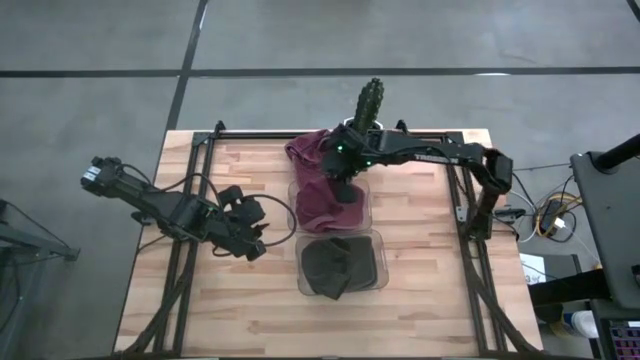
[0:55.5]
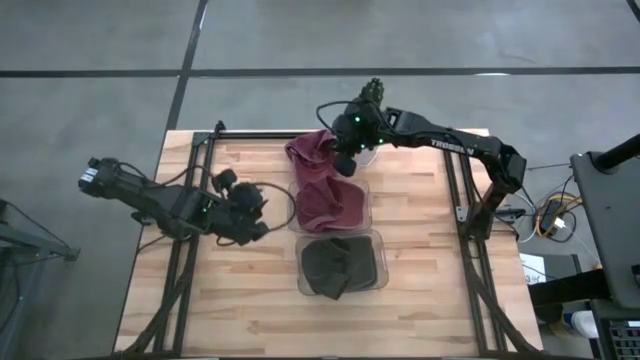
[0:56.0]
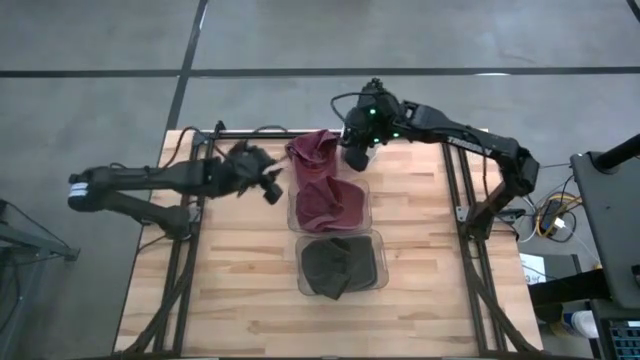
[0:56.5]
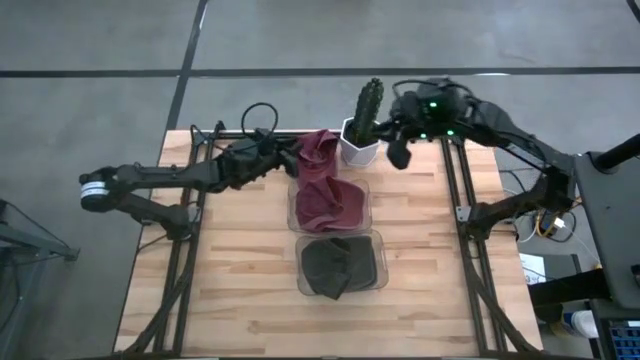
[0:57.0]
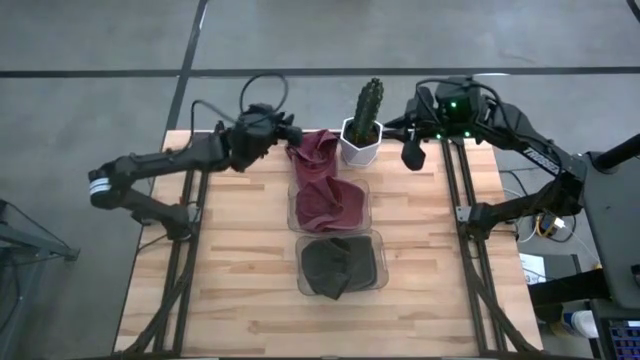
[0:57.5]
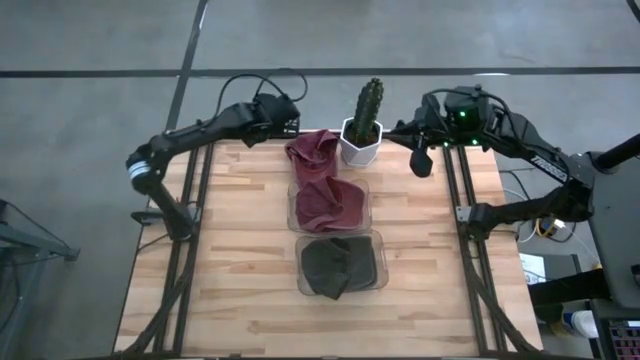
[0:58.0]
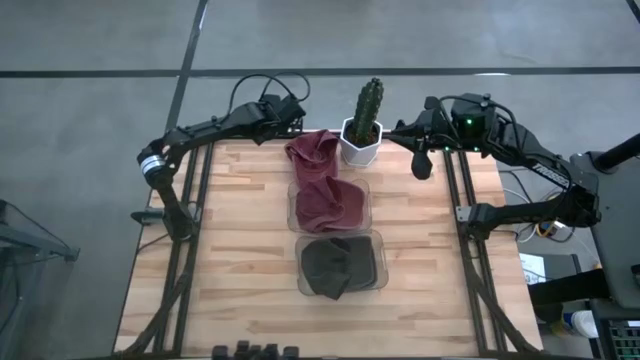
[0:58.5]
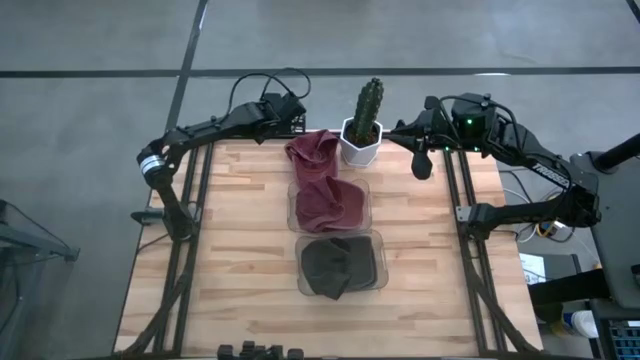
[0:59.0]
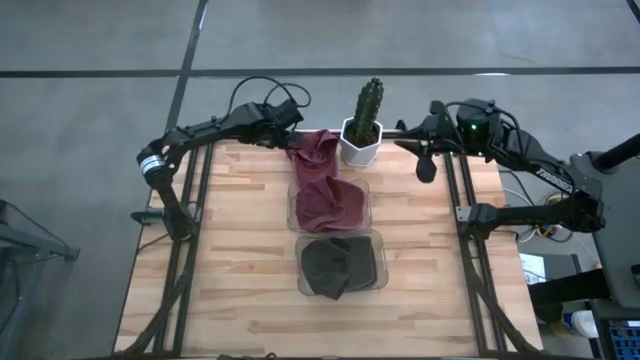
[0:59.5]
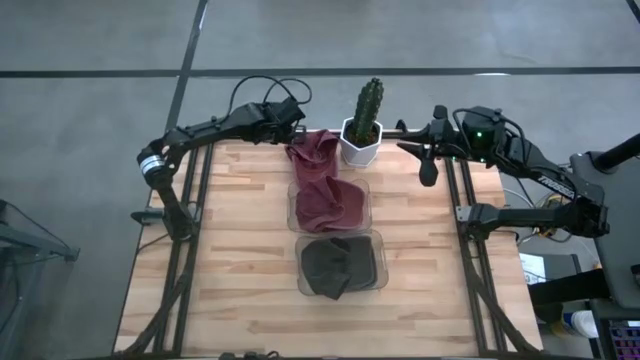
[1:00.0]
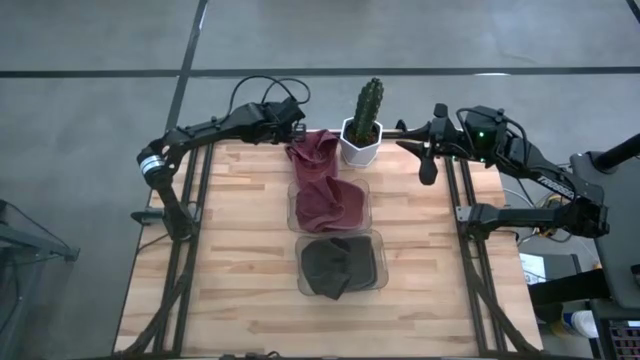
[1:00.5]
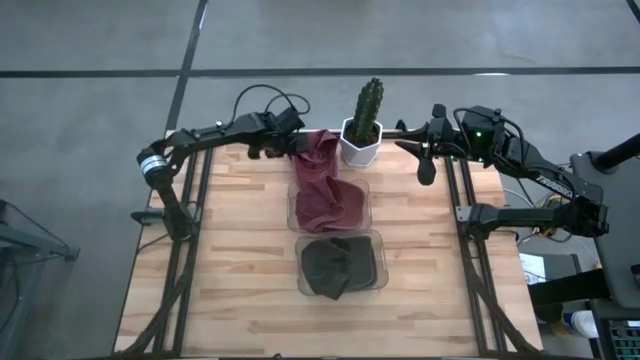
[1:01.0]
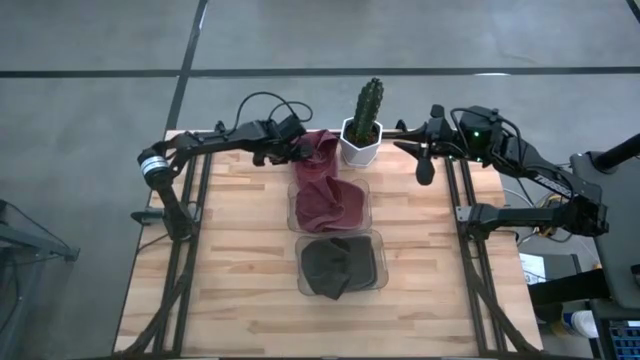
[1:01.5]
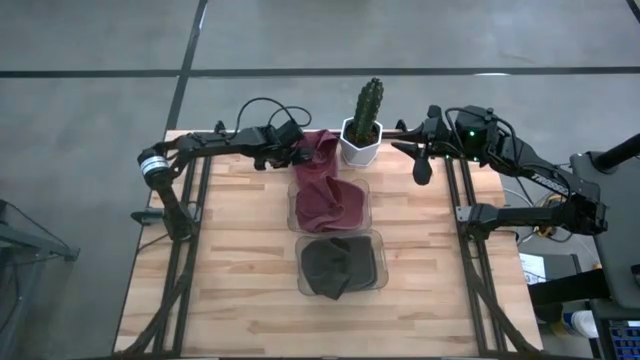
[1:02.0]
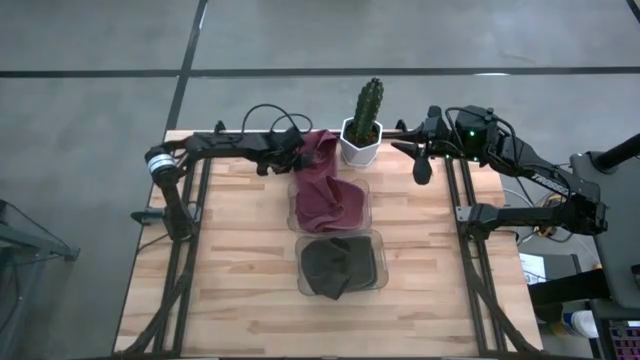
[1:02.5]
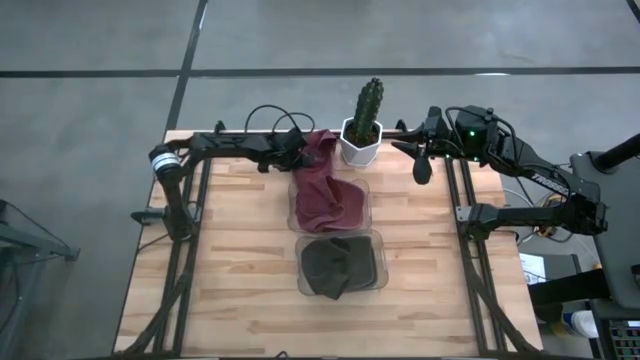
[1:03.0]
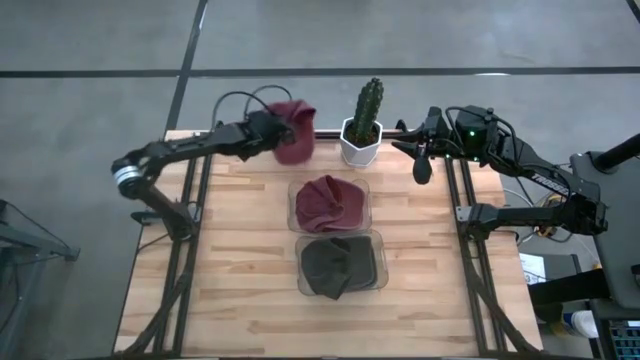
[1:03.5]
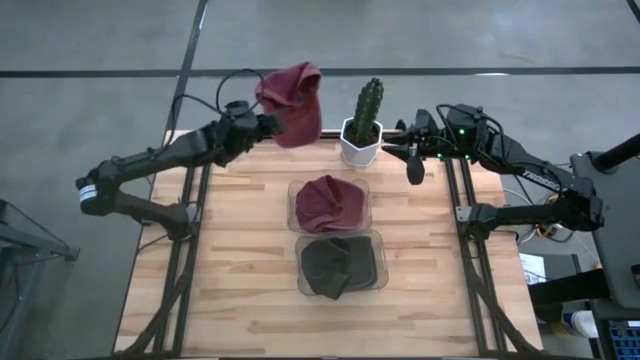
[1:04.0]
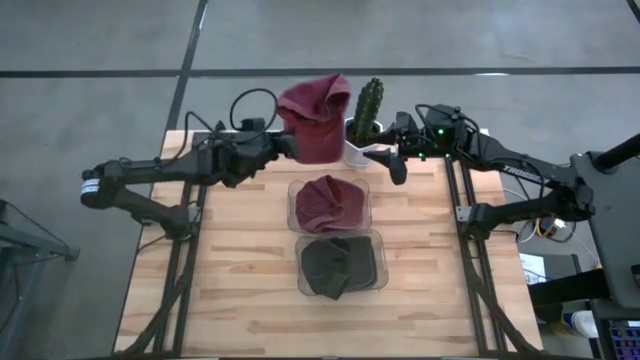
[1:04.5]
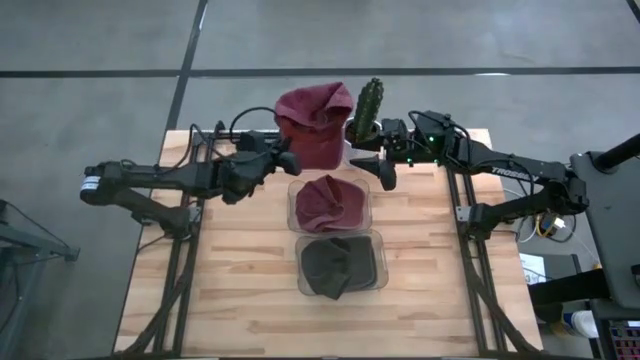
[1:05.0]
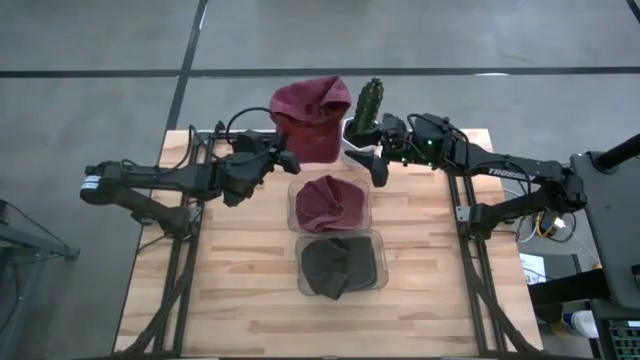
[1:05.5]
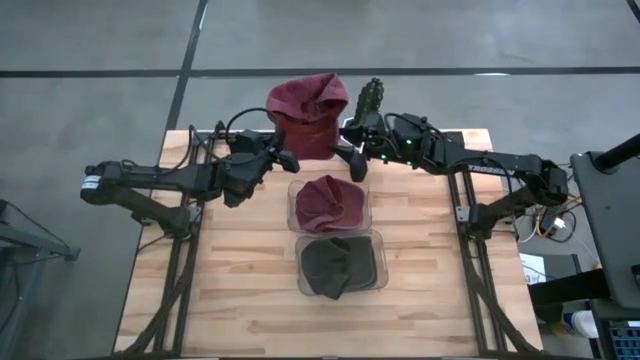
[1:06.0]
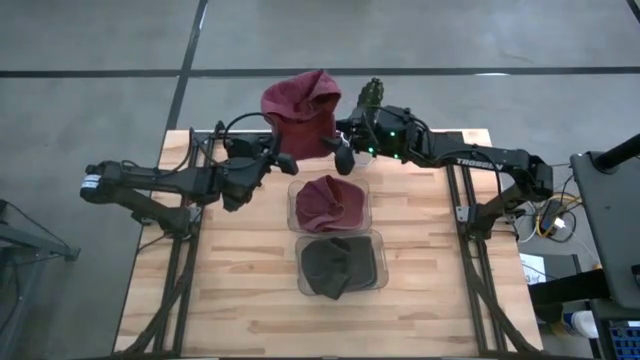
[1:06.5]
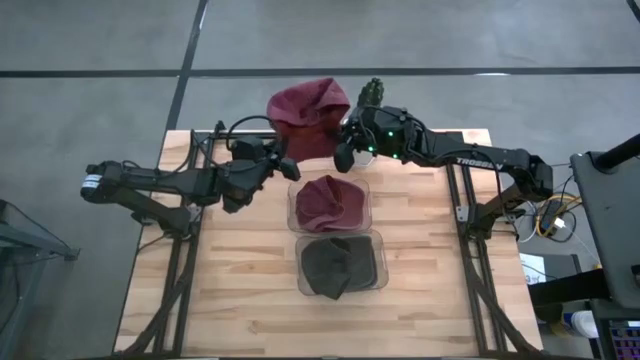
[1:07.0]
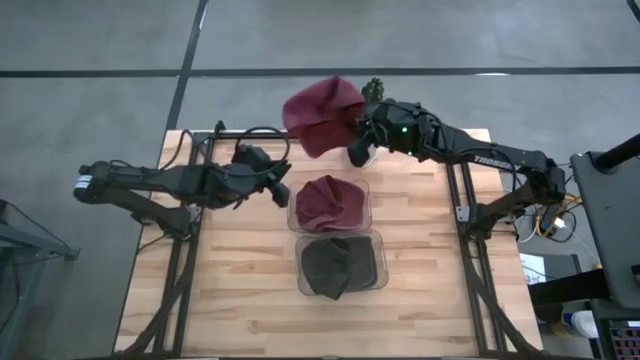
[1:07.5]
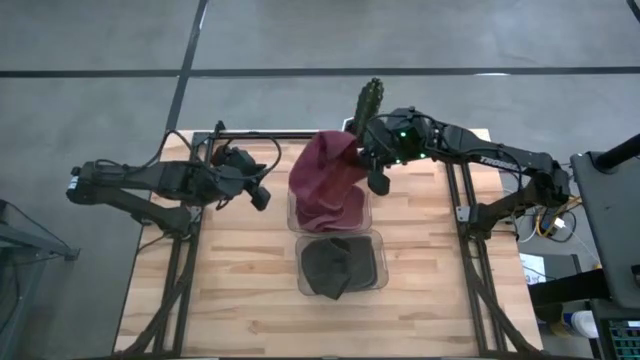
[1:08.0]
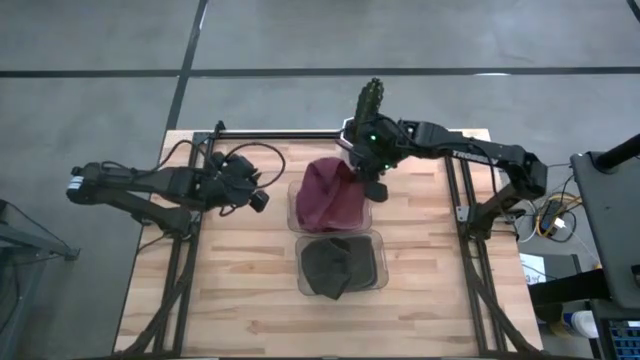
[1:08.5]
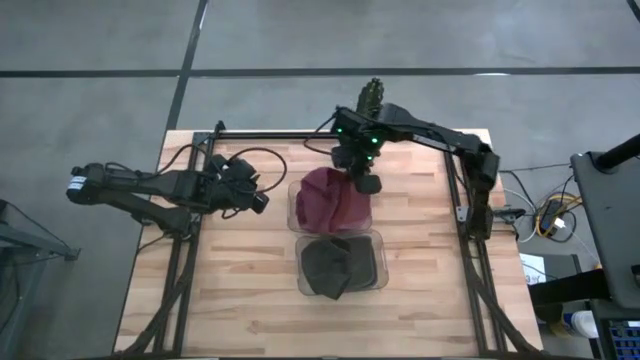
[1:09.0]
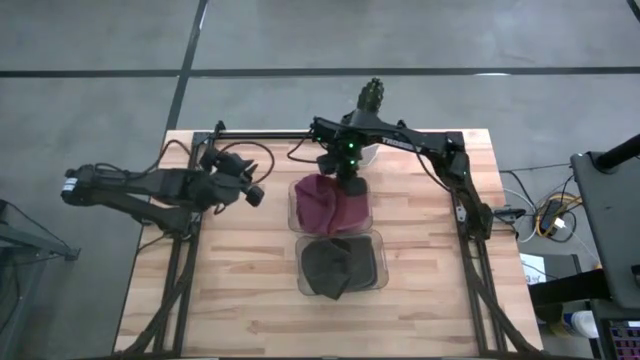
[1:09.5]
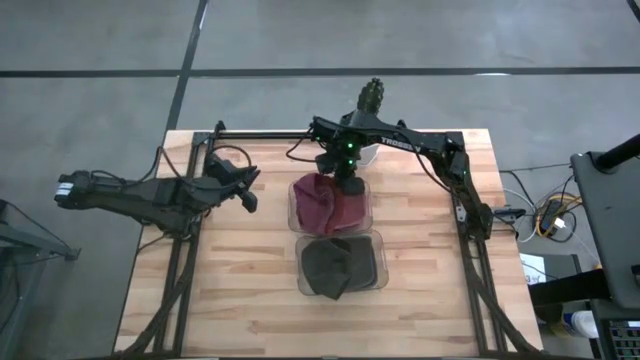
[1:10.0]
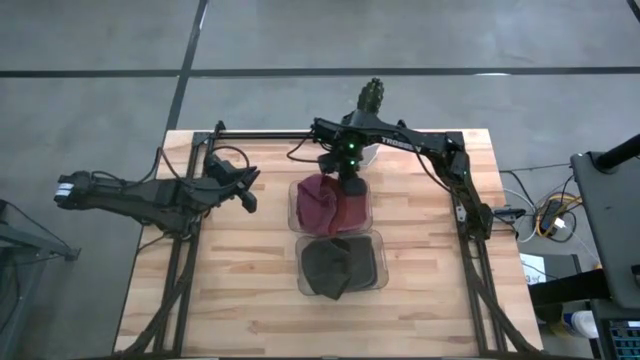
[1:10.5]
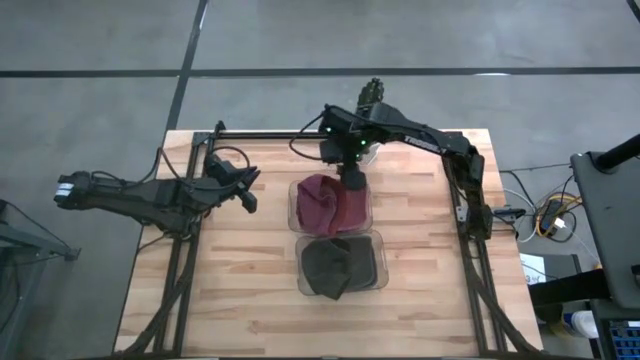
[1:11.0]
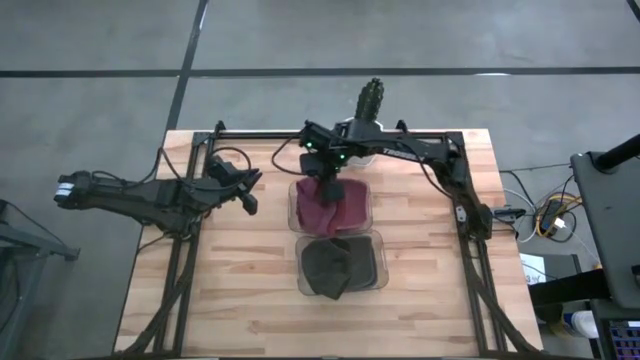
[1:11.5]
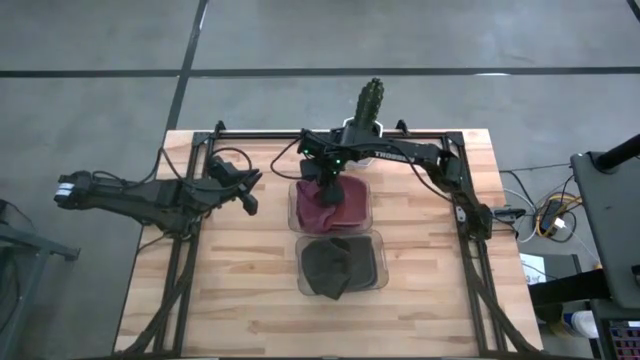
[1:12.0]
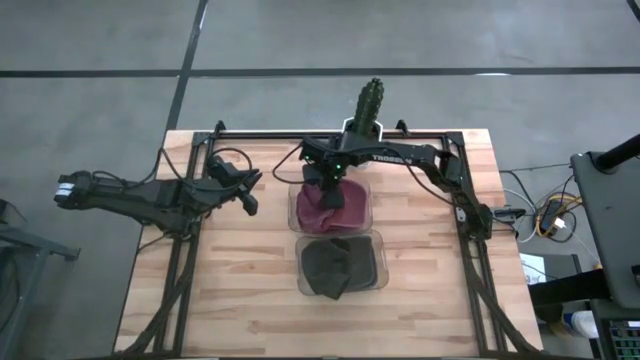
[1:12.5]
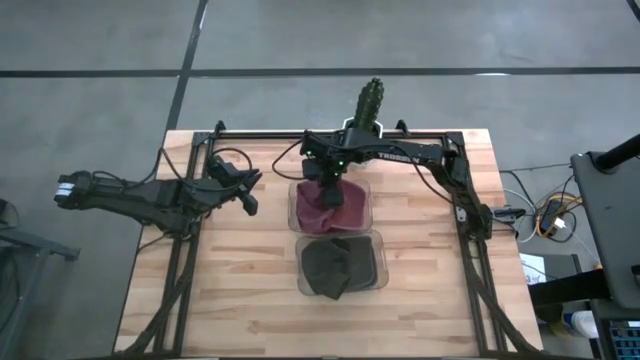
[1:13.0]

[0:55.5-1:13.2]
Task: Pick & Place hat
Put the dark red cap into the top transparent bin

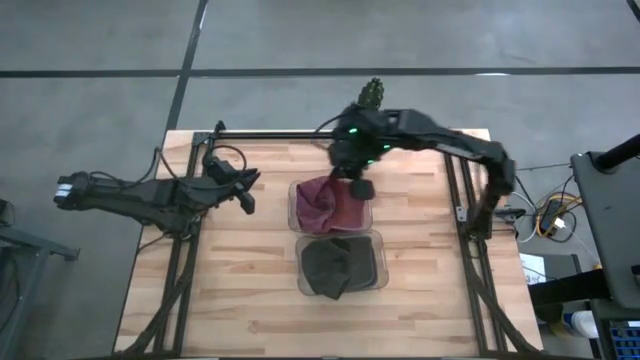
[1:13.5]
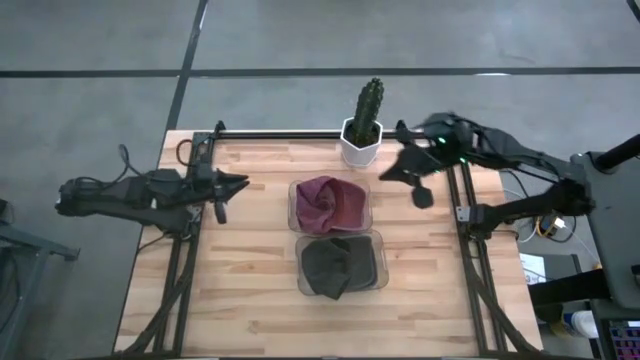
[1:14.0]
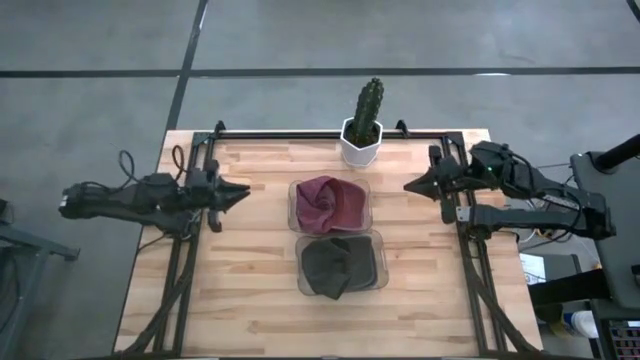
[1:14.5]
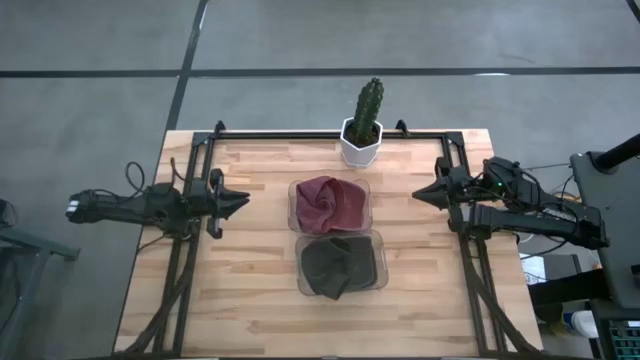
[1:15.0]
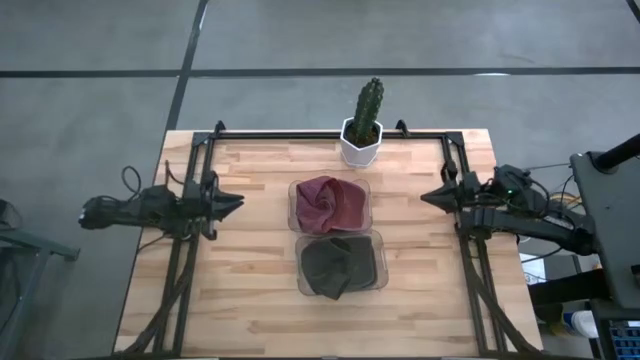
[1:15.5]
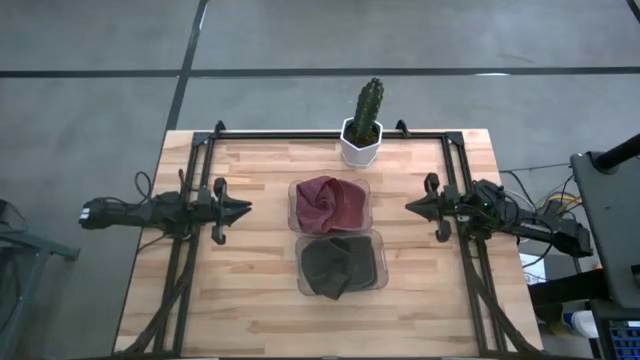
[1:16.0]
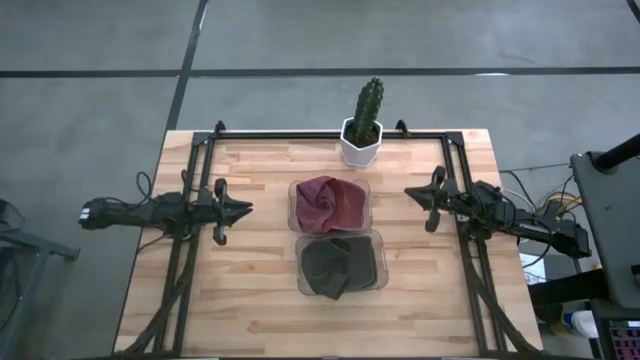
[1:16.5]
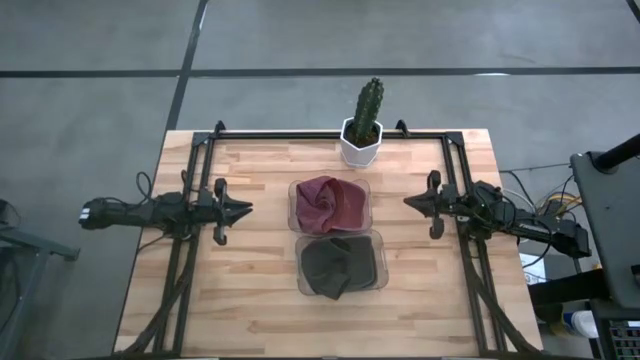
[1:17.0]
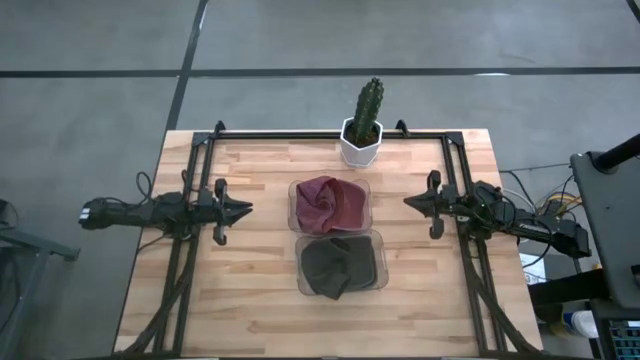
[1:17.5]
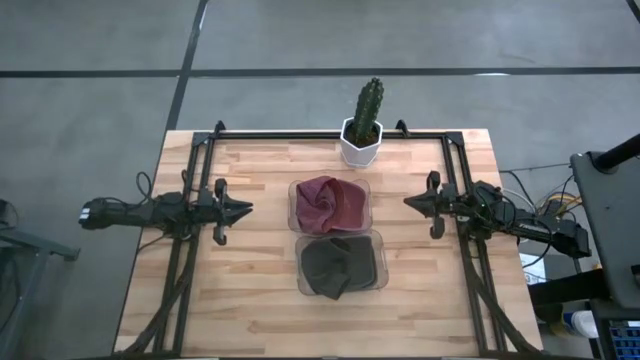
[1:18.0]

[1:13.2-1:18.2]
Return to Home Position
